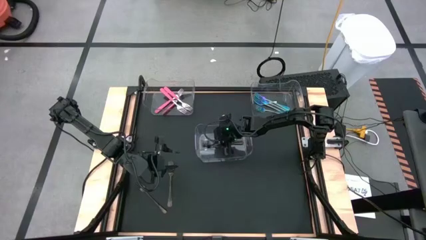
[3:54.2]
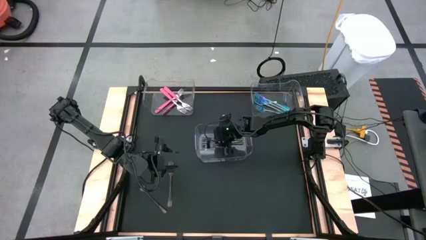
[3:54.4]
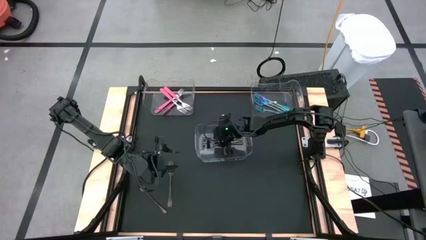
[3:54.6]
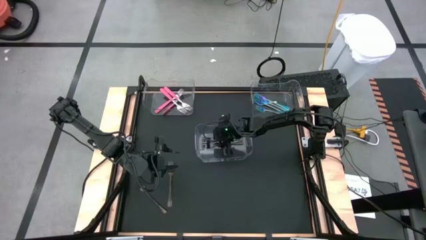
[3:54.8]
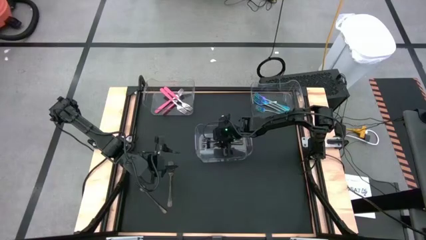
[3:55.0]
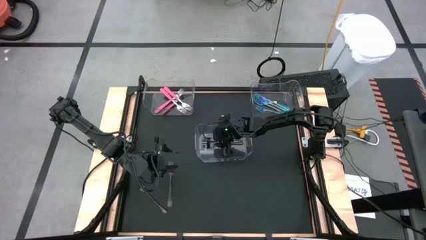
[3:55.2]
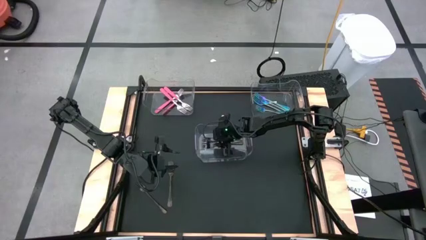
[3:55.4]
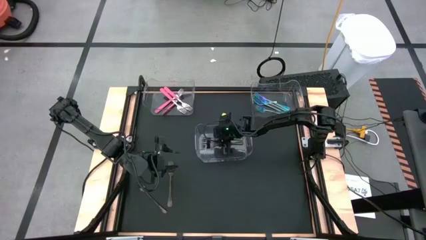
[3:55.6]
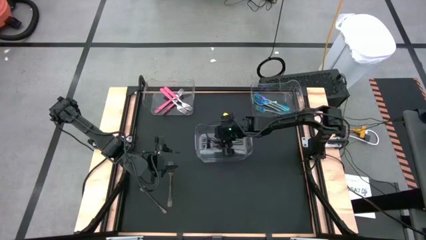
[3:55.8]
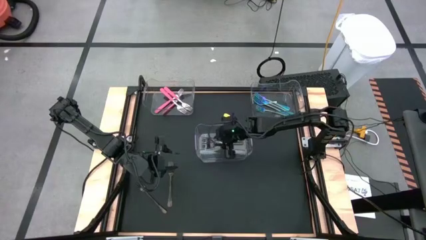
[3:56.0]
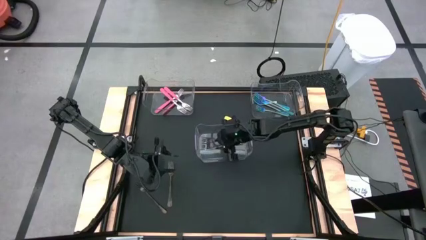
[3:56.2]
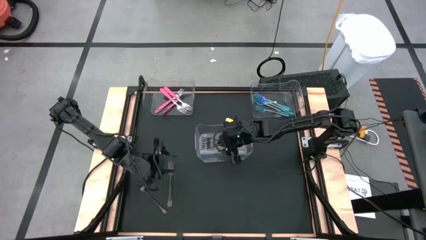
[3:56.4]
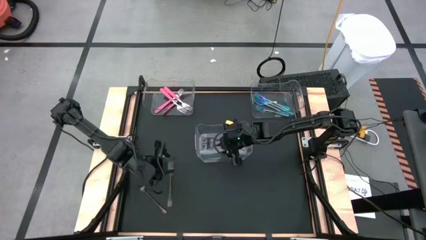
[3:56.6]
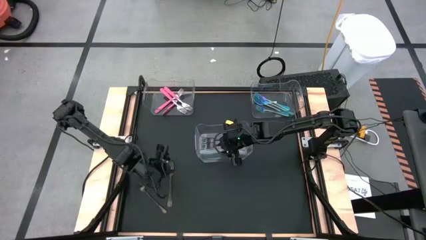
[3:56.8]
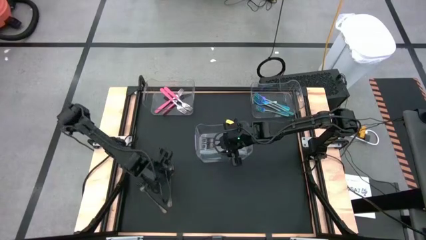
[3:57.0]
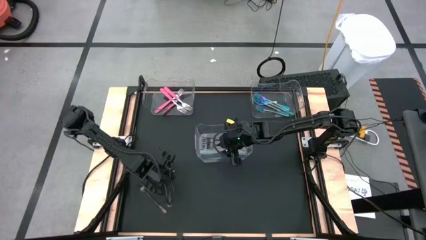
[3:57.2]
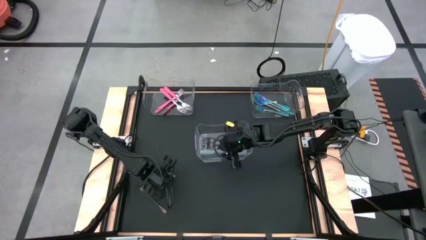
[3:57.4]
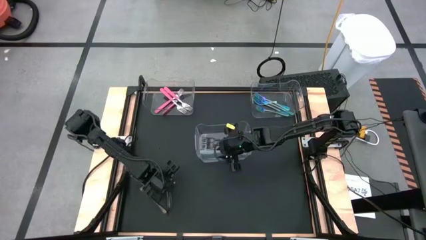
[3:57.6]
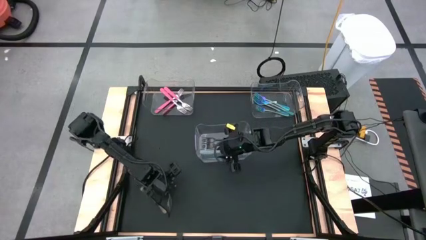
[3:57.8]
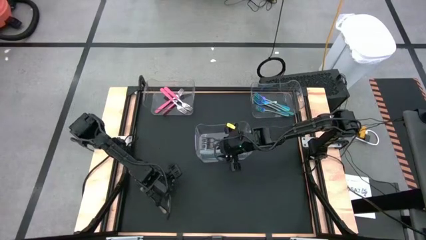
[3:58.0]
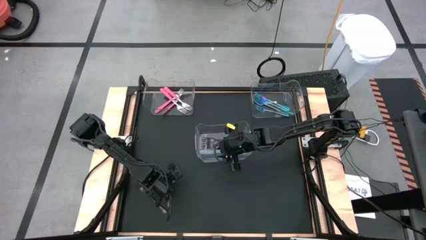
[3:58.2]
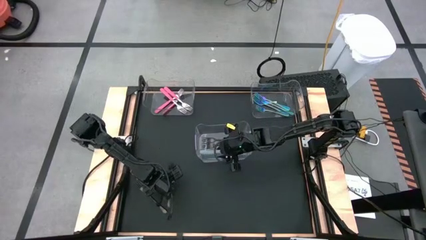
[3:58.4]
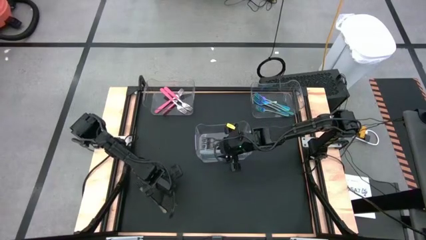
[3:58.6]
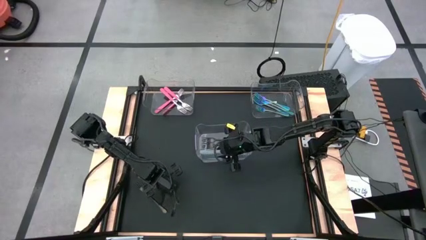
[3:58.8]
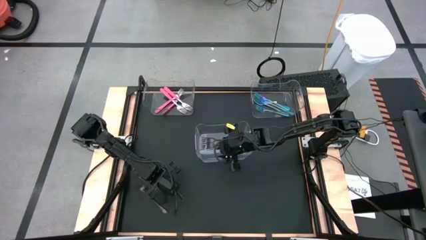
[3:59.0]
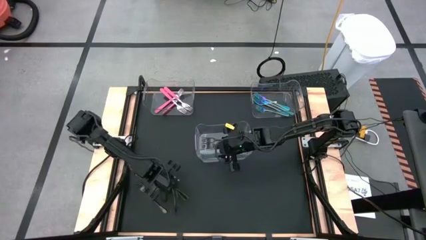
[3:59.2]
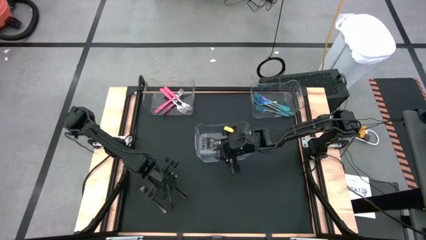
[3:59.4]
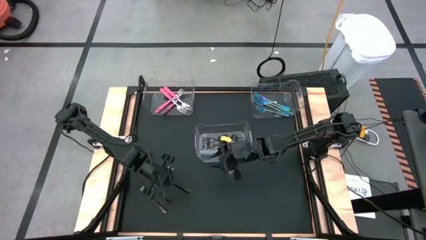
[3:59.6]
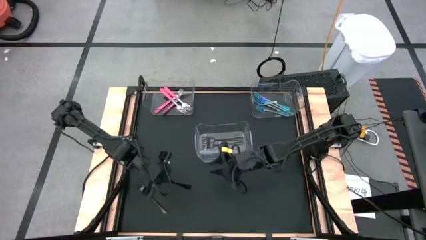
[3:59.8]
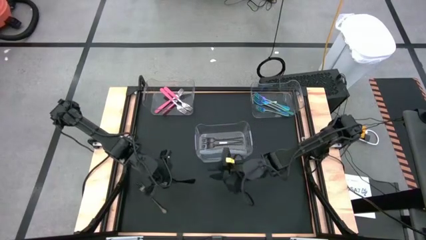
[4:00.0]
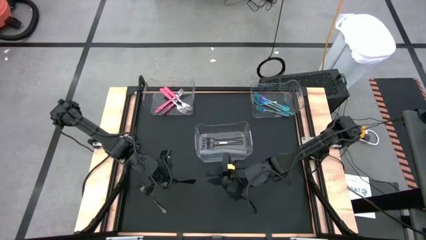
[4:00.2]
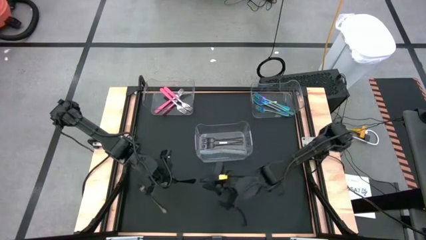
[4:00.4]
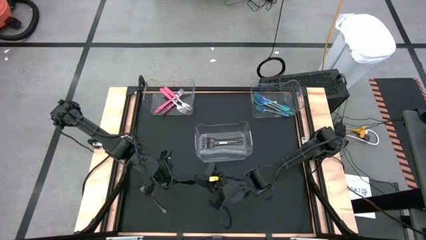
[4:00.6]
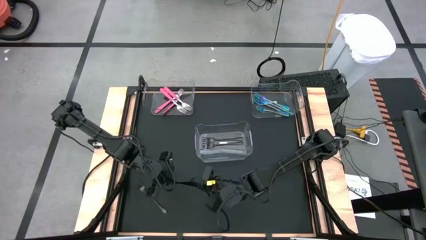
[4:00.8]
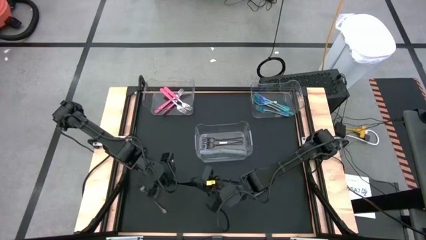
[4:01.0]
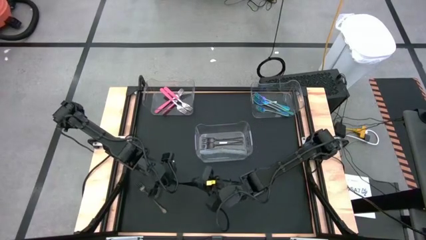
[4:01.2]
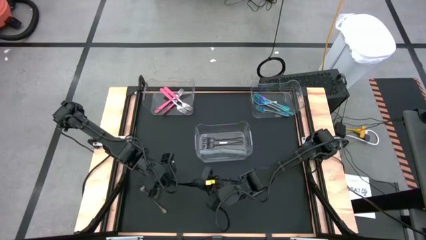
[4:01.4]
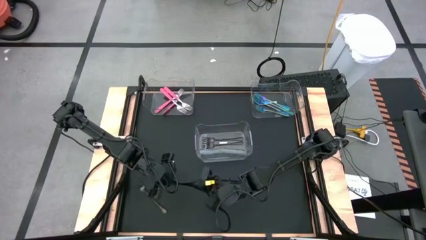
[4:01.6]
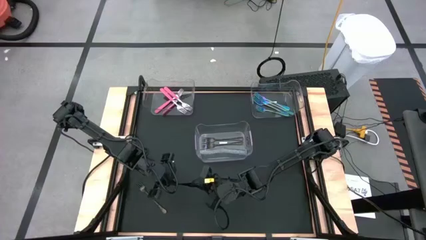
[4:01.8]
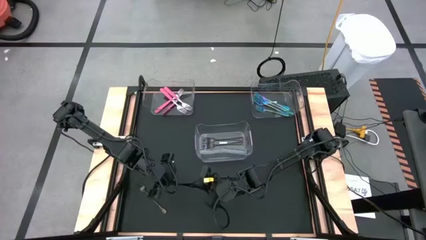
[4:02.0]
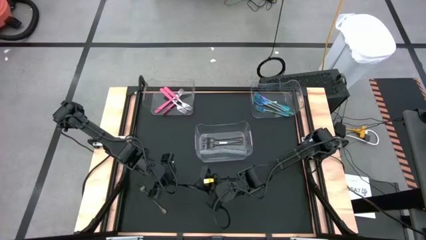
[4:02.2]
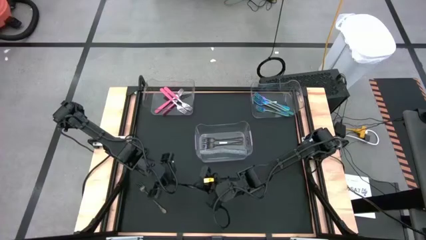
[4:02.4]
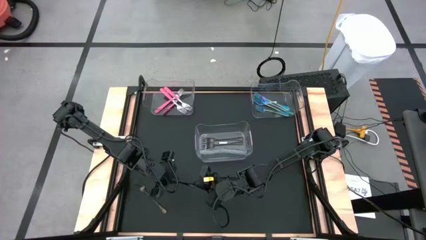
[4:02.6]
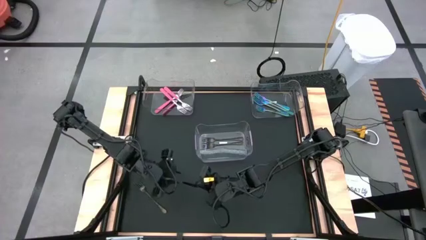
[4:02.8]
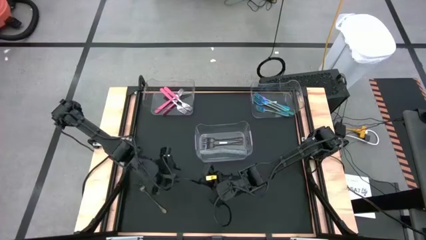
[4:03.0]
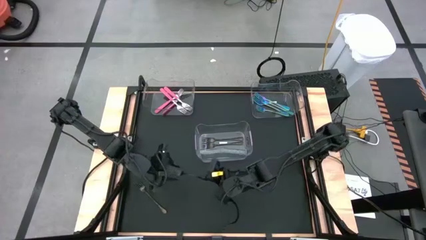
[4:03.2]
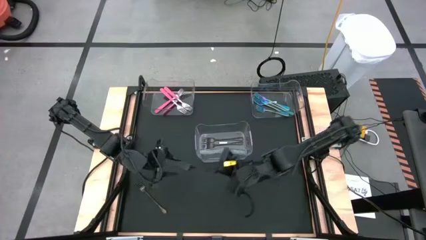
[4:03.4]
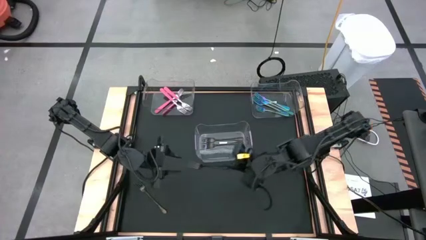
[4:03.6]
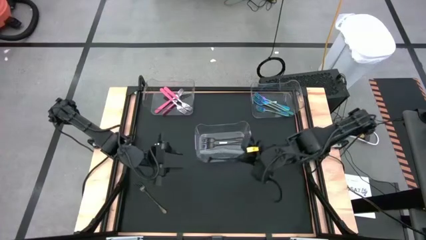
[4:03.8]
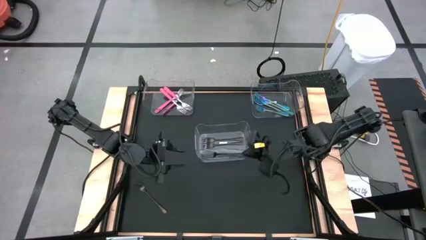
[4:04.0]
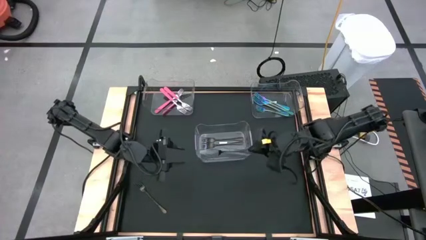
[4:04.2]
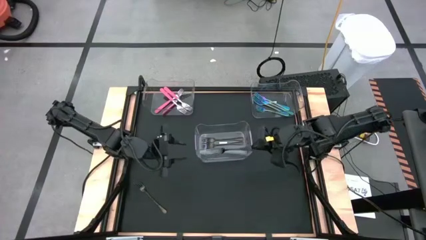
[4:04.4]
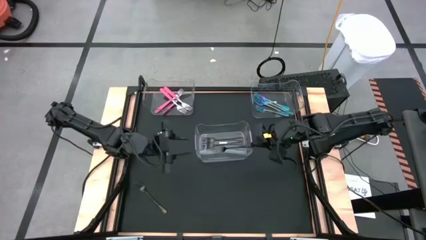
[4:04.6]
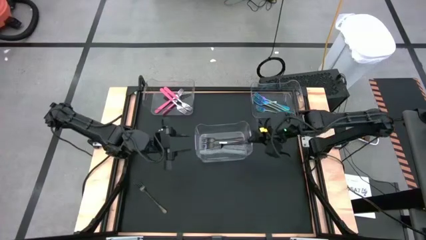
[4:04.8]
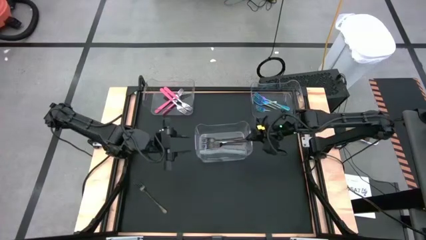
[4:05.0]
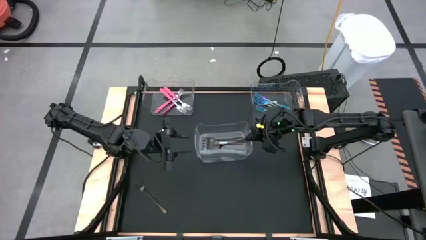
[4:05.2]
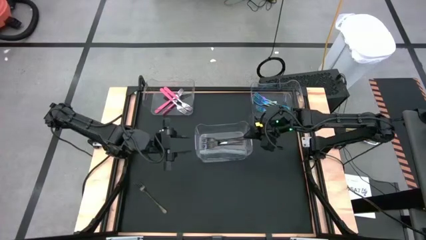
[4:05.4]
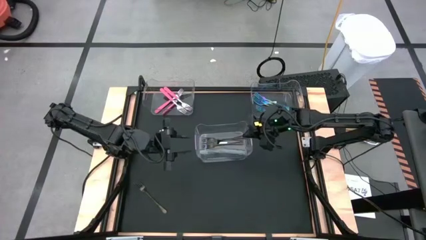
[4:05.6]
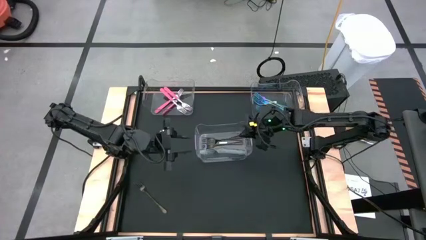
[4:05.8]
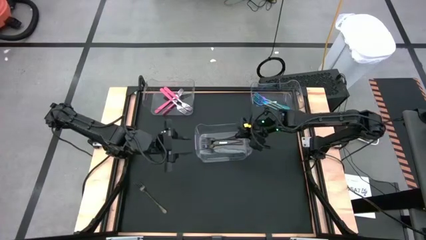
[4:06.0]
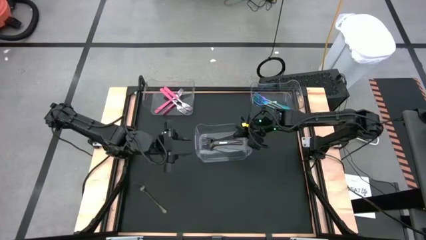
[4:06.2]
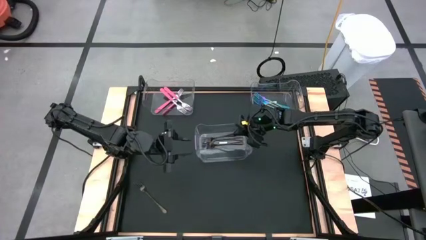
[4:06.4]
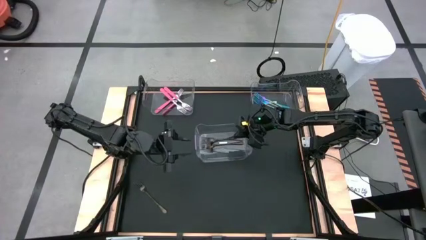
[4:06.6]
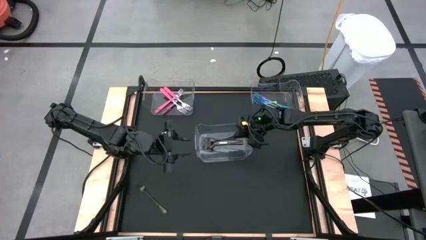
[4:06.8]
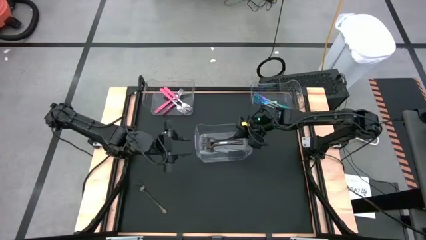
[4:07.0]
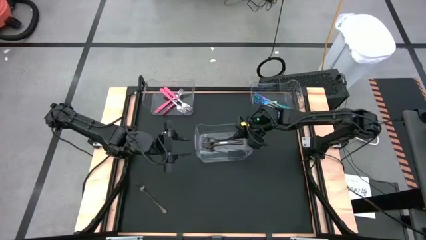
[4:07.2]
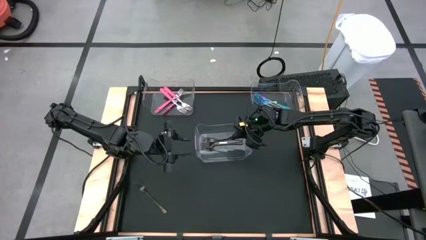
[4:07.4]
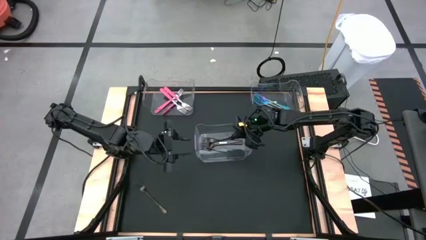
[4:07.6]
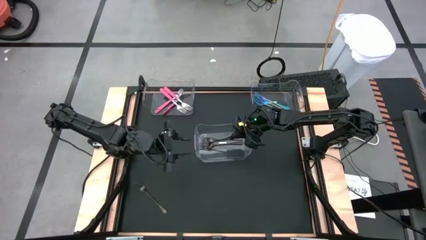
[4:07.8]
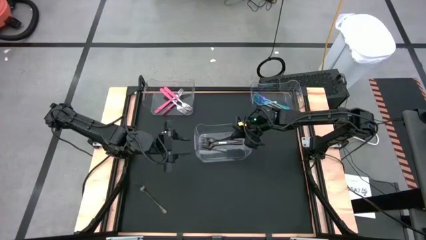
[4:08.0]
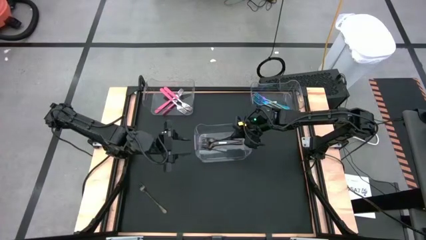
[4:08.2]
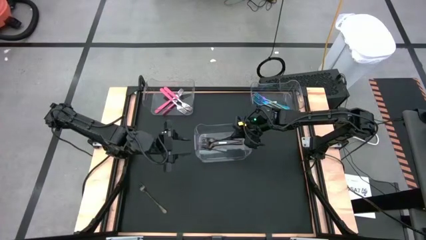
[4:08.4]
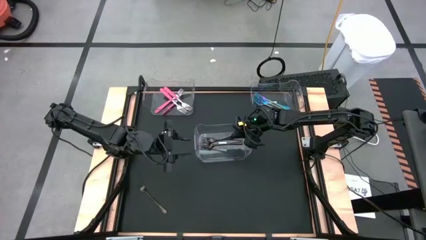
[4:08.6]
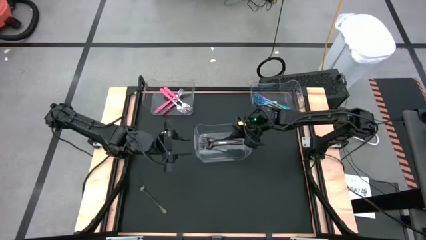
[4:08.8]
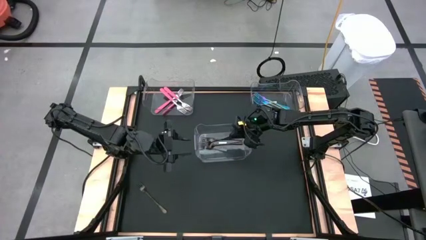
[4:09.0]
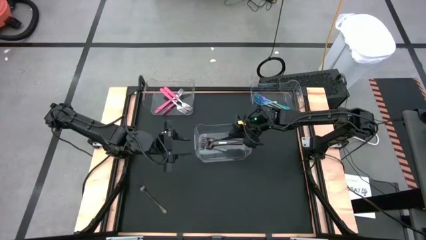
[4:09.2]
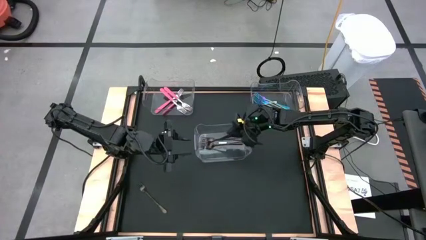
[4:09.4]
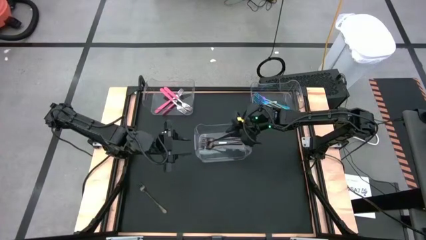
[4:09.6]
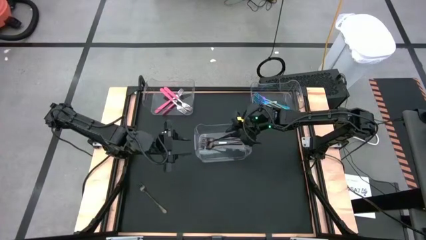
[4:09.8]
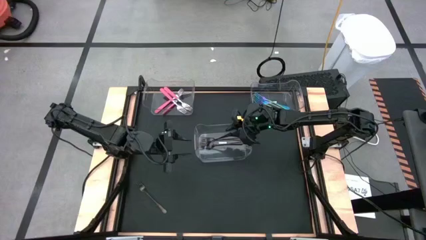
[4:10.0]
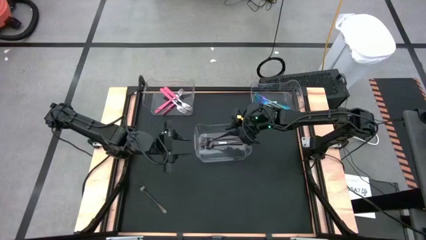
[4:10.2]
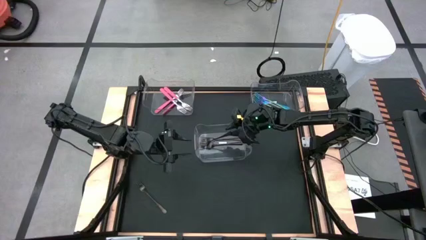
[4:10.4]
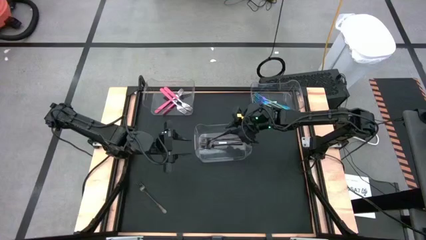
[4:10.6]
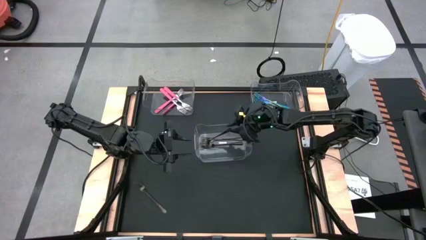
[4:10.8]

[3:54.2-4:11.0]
Task: Sort silverware by color (type)
Put the silver fork into the middle transparent bin

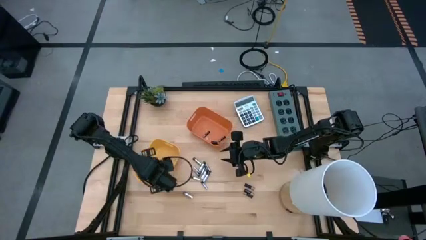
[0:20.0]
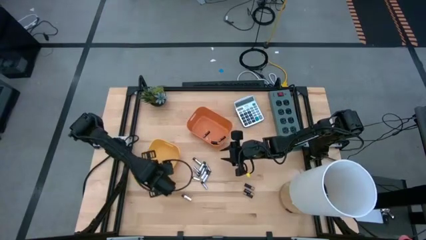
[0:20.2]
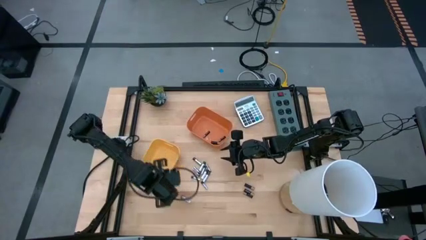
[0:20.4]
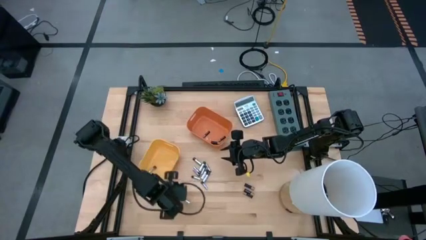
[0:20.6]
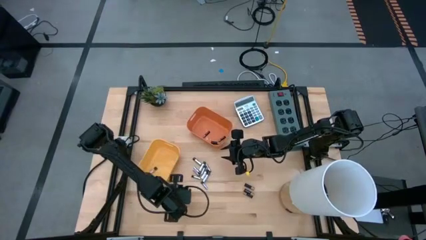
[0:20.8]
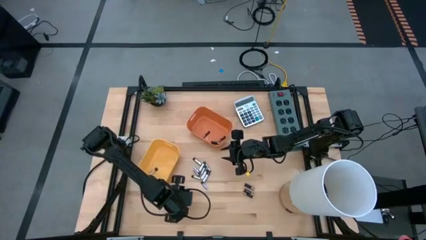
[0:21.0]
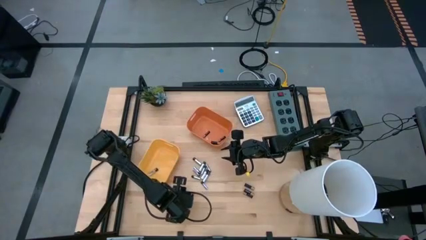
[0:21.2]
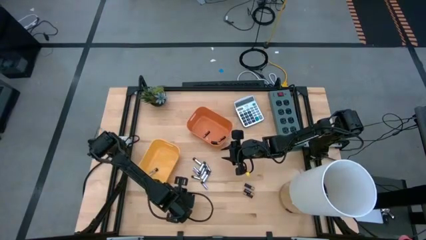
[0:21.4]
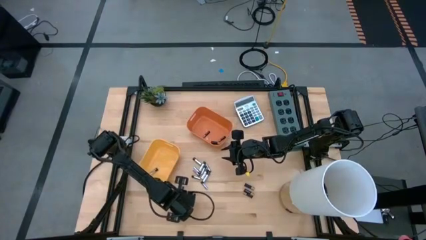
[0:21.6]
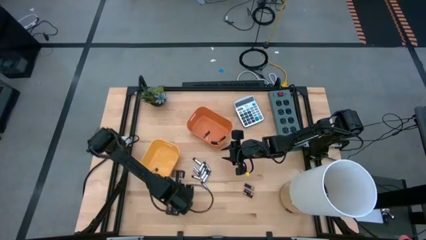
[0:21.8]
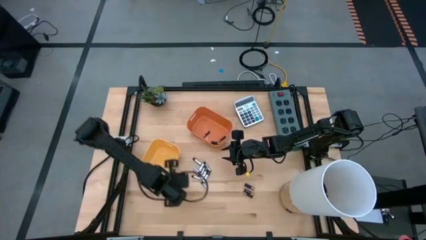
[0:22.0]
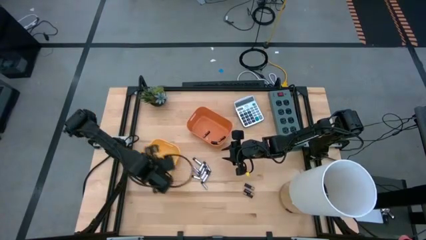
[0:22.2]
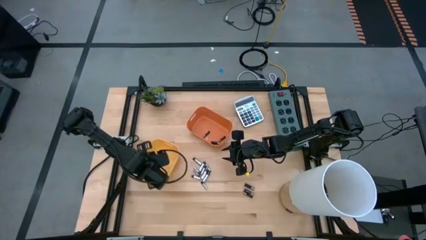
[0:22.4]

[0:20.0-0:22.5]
Task: Sort batteries
Put the silver battery into the yellow bin
